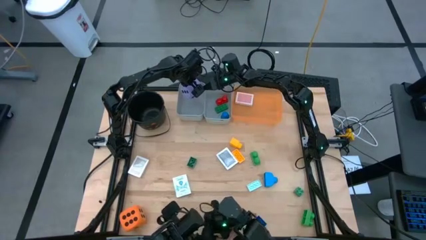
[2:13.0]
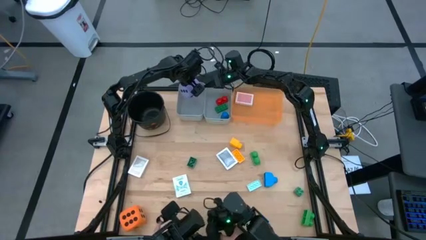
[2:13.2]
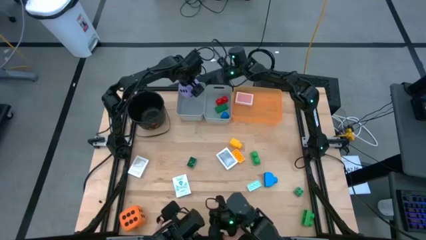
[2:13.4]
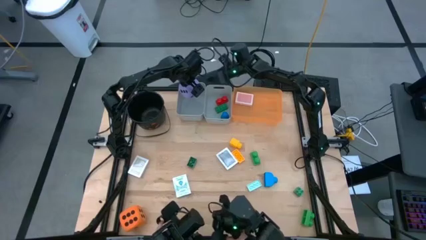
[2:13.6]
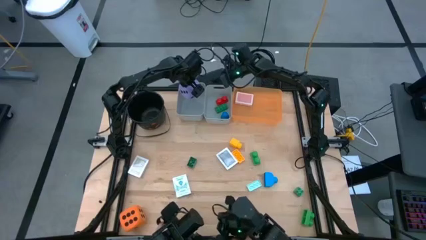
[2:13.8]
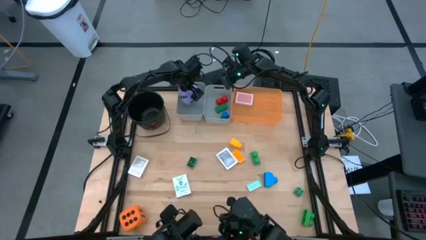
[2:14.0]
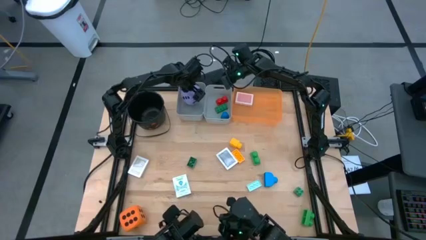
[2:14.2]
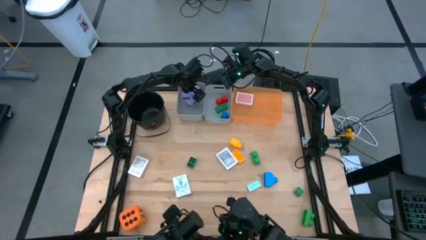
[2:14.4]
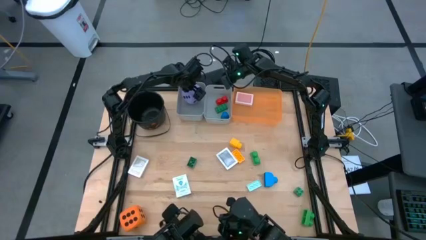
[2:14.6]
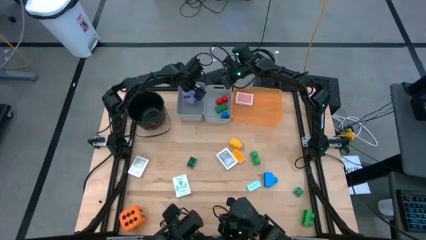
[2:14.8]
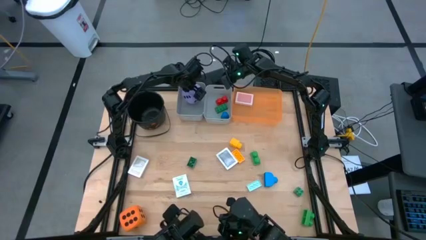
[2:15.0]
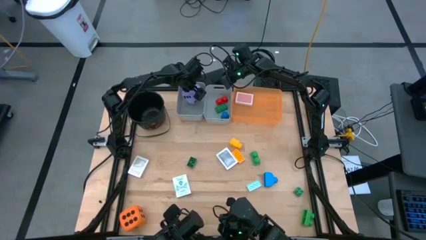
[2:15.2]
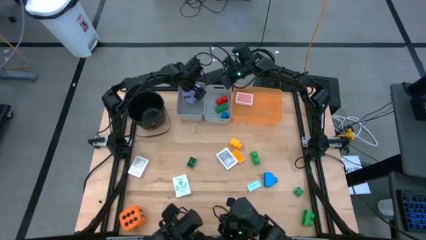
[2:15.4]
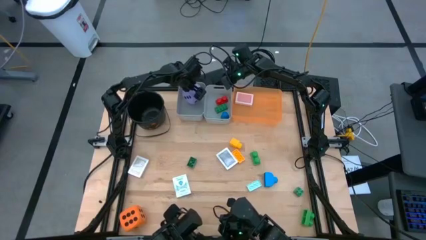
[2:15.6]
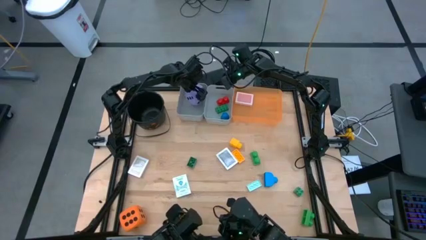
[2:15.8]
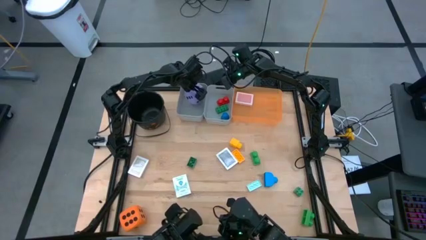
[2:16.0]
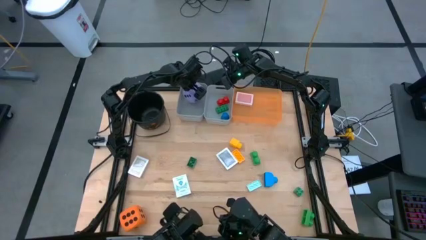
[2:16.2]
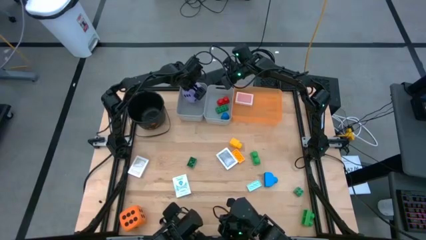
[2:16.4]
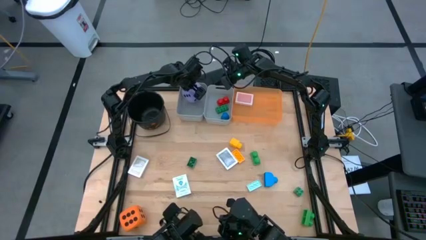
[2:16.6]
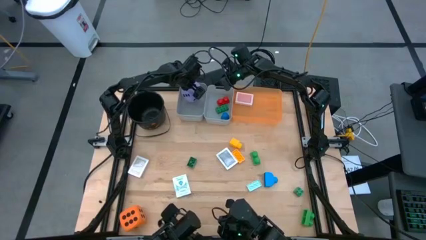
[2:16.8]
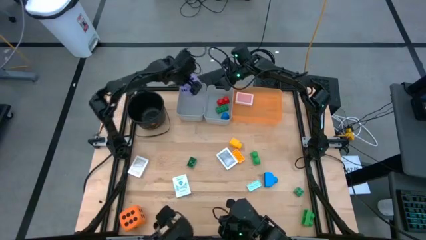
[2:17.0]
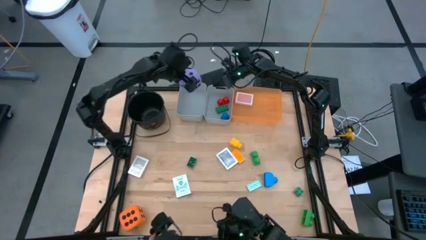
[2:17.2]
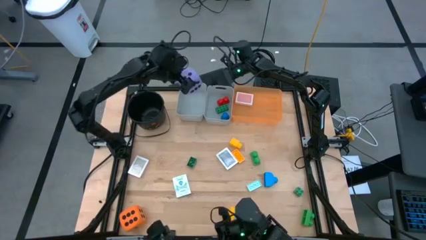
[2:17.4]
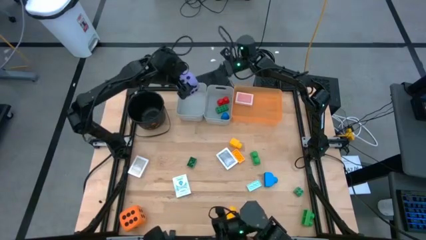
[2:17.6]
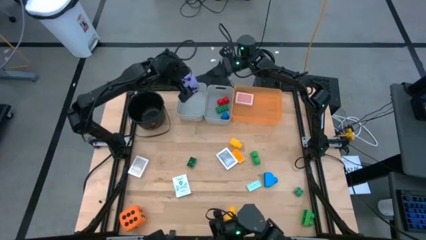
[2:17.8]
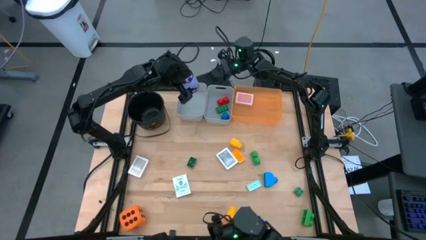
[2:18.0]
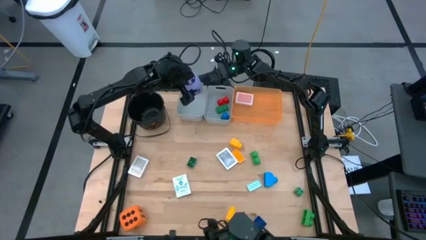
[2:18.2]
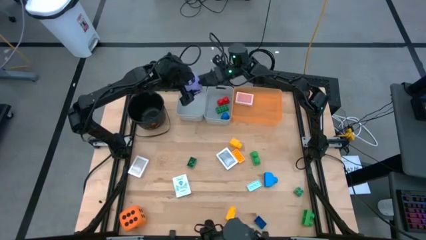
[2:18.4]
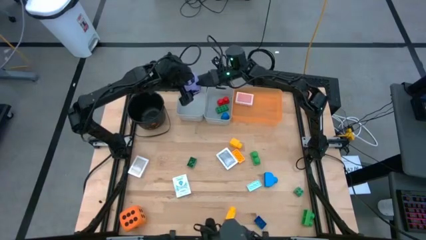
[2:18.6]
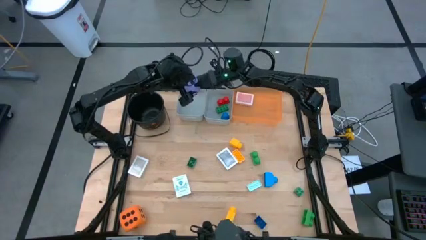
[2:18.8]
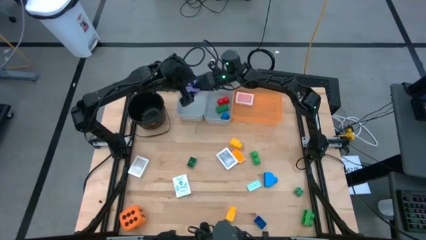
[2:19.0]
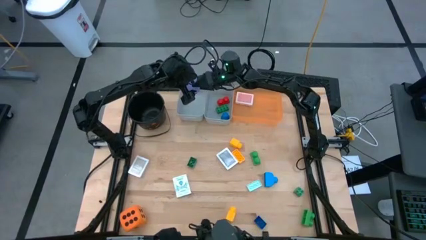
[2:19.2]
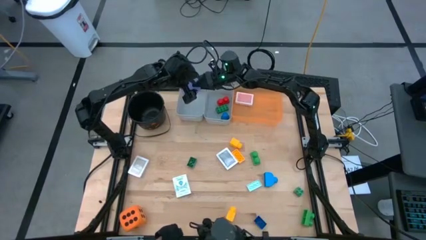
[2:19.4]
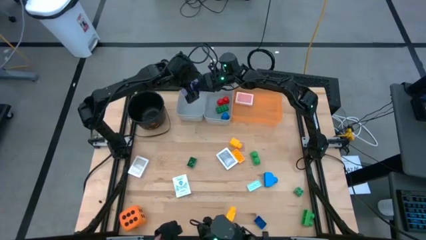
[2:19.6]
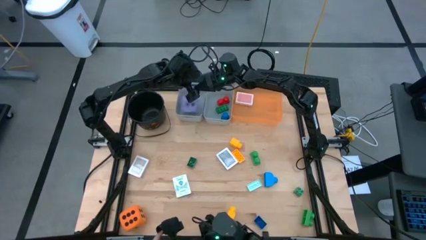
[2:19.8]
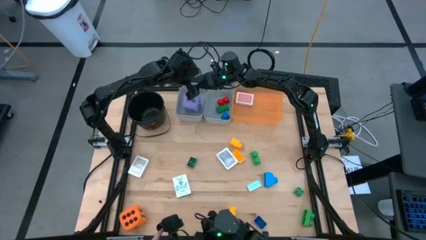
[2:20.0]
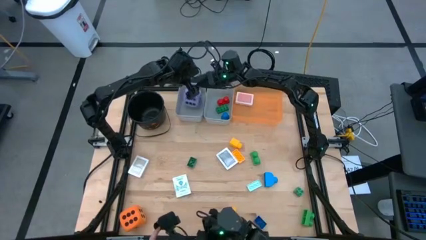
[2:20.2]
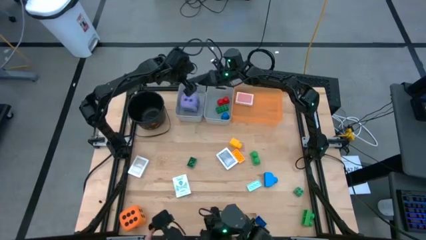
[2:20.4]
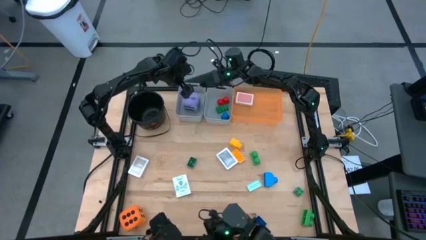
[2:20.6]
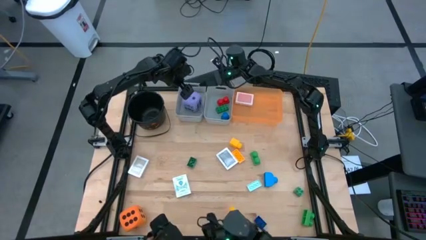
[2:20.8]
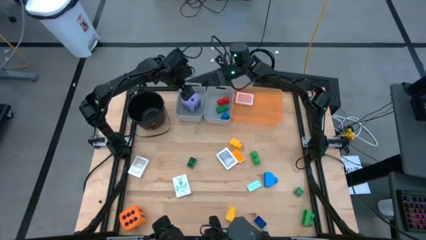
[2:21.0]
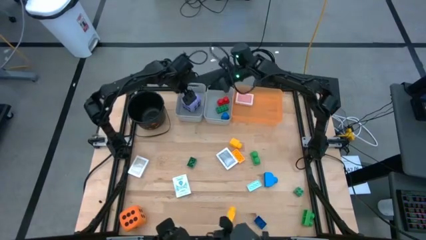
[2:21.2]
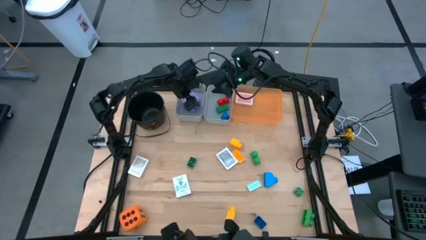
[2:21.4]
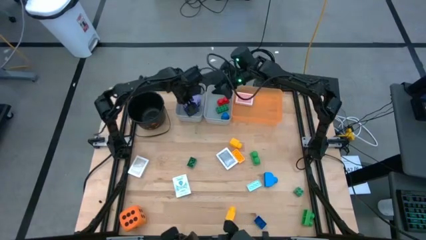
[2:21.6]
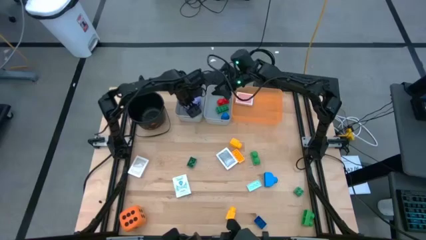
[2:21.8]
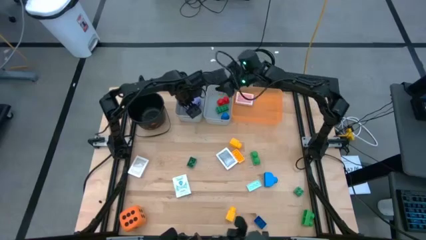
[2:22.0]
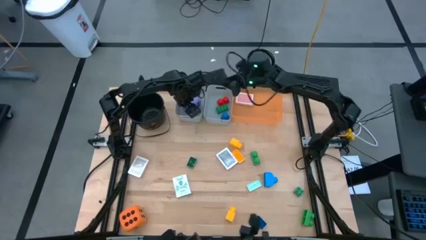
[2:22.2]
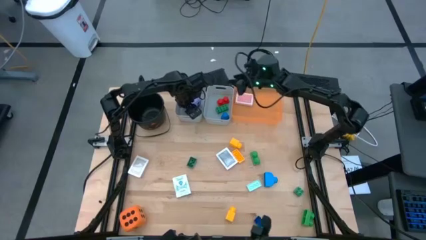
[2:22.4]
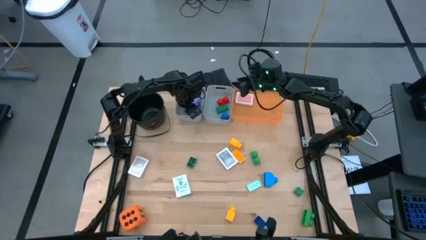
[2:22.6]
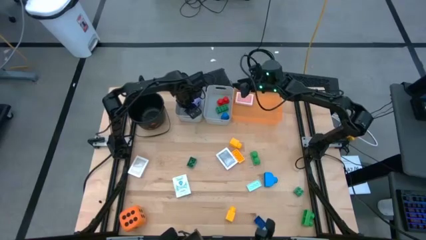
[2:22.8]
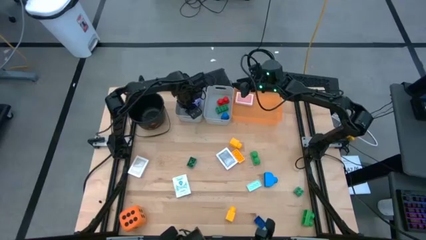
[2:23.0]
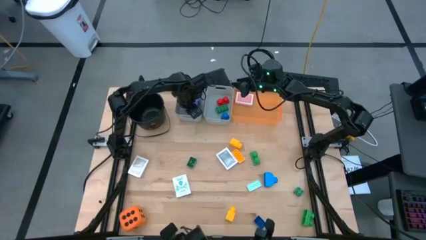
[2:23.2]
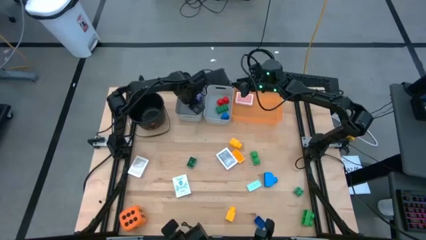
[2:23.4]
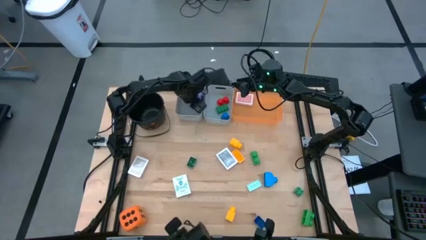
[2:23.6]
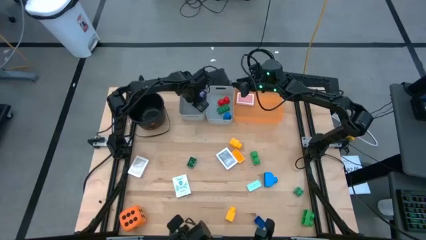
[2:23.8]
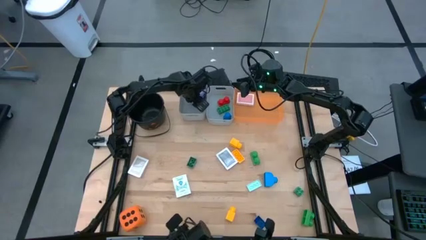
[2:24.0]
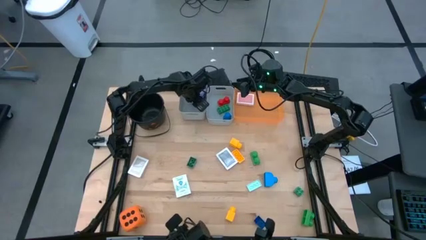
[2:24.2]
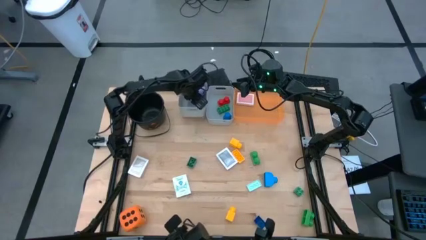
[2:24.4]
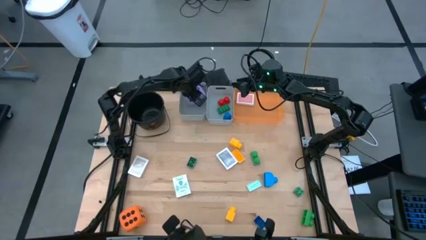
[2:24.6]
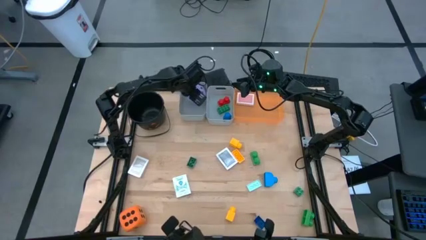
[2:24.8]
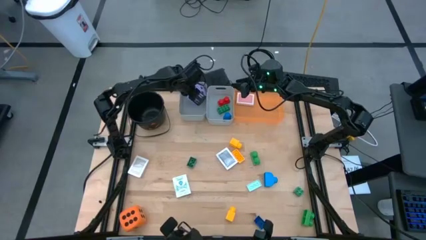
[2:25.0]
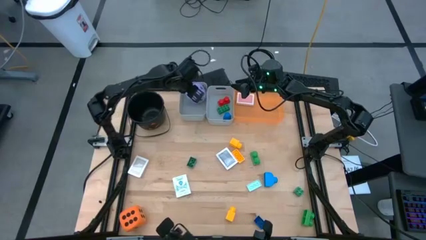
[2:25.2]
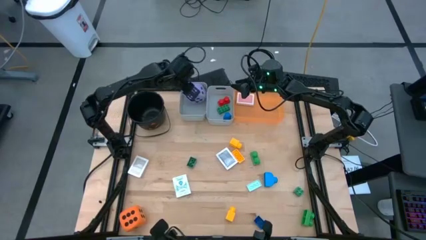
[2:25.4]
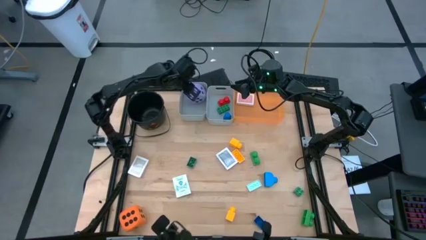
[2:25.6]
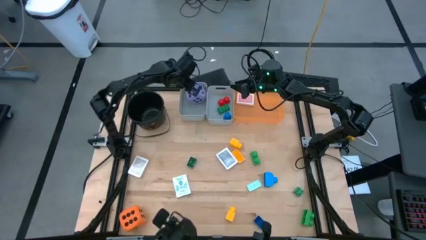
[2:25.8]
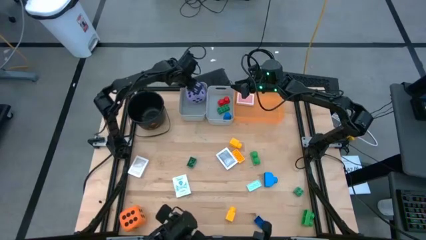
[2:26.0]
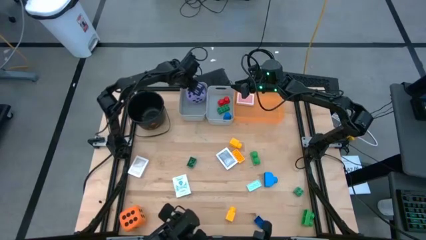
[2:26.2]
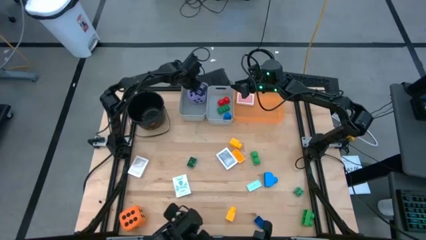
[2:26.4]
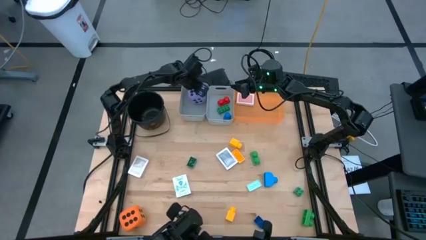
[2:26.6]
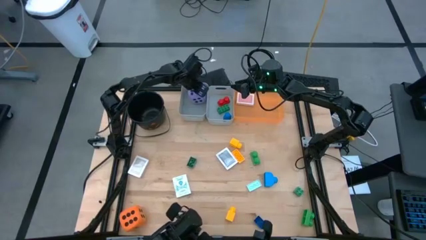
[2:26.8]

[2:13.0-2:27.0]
Task: Pick & Place Toys
Put the purple dice into the left gray bin
